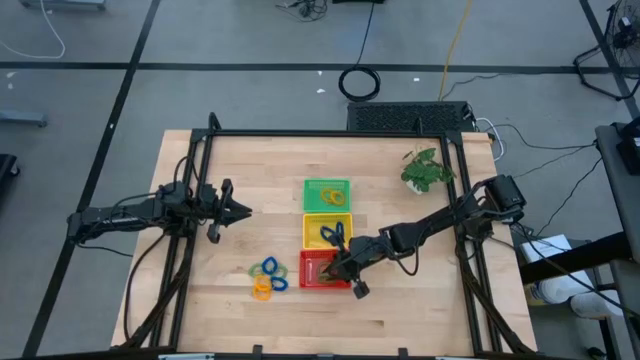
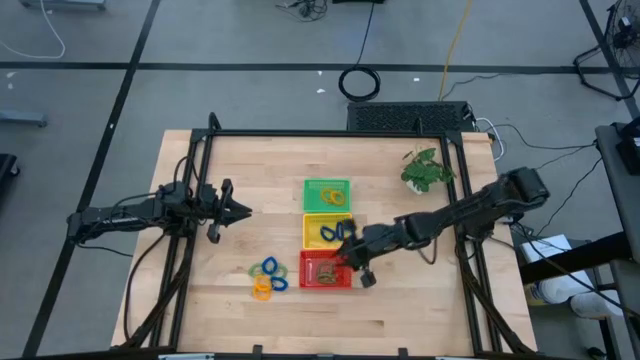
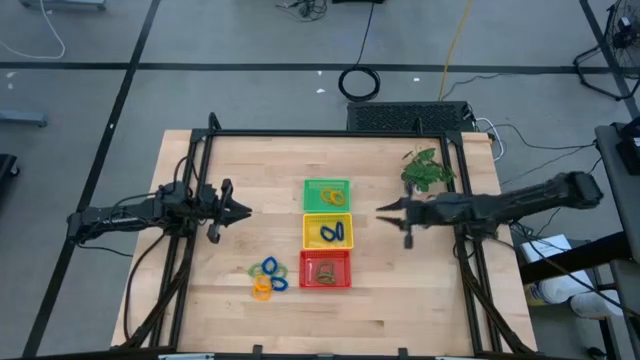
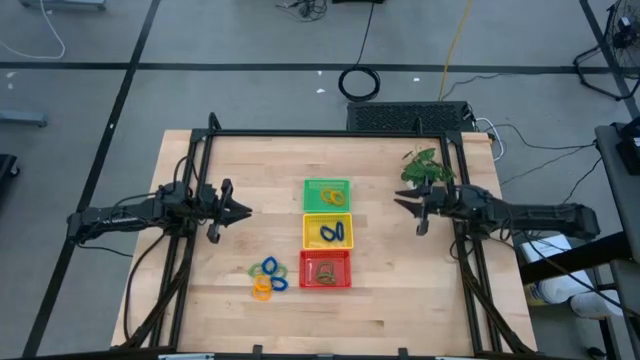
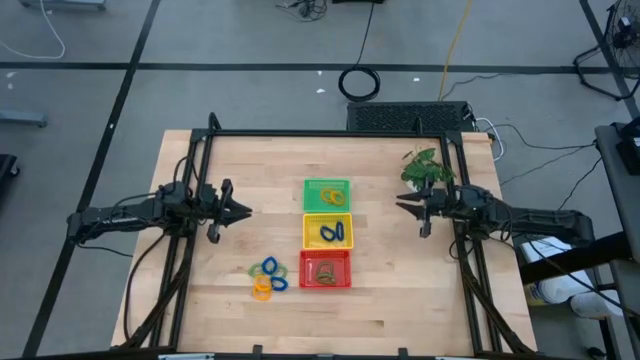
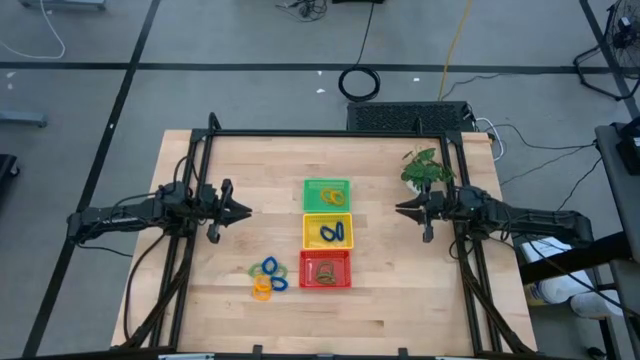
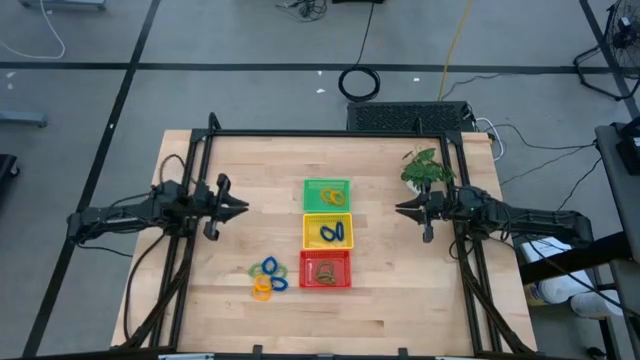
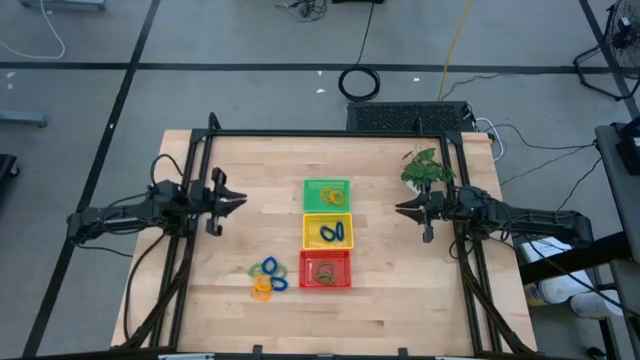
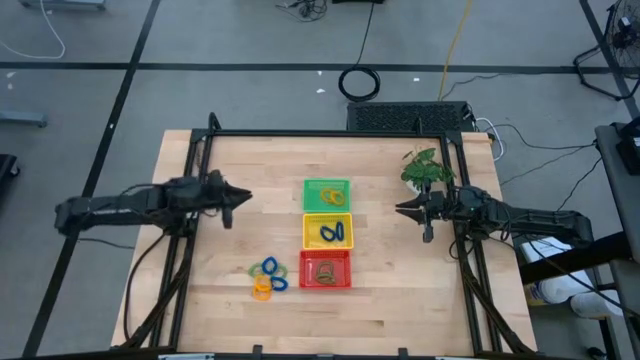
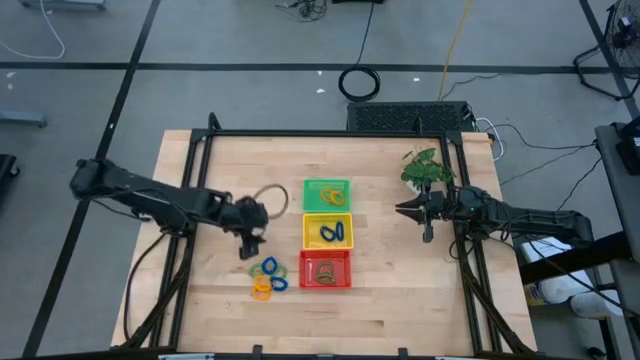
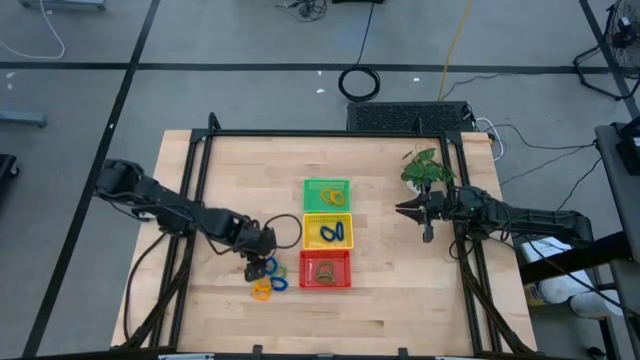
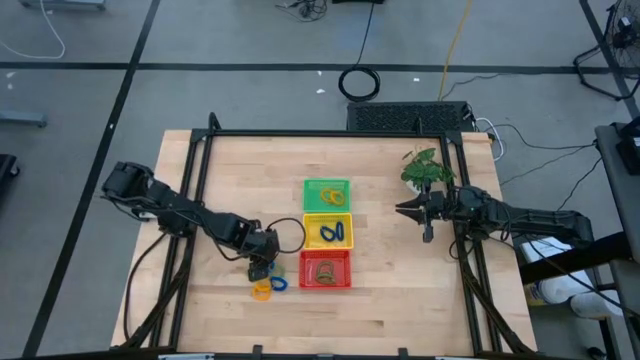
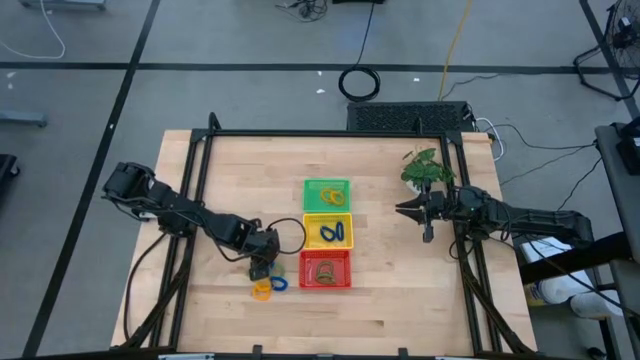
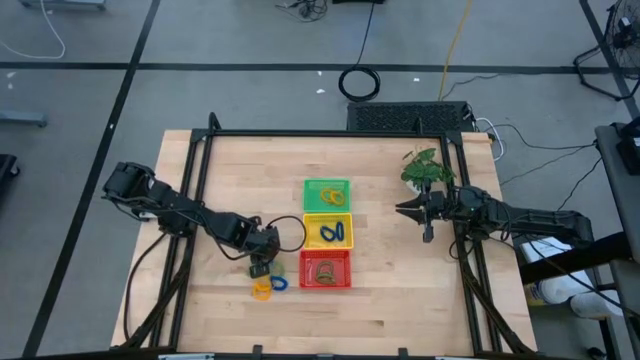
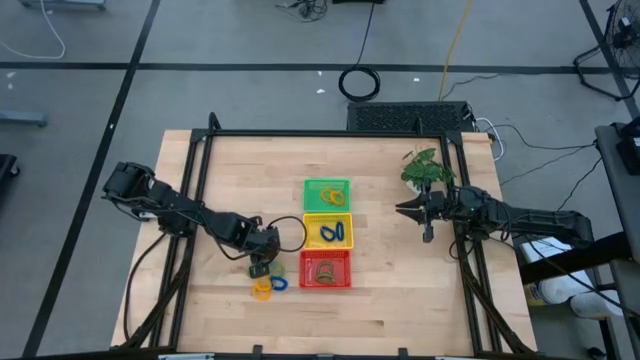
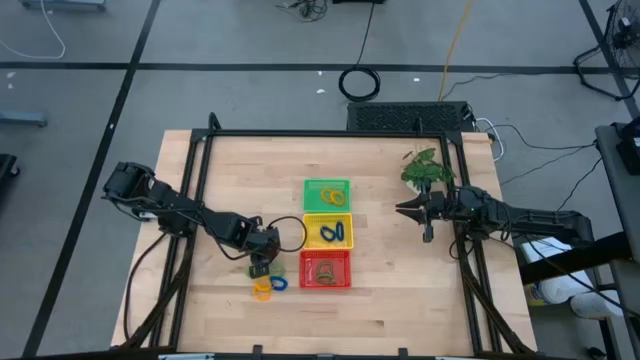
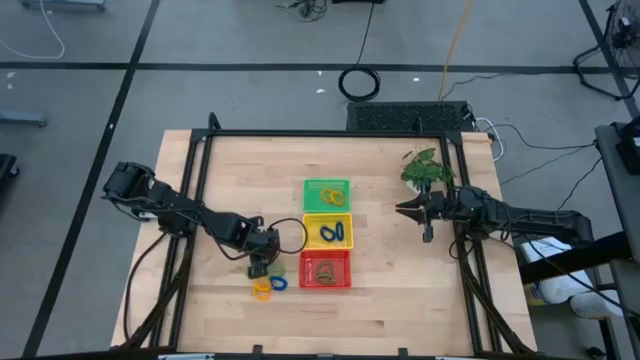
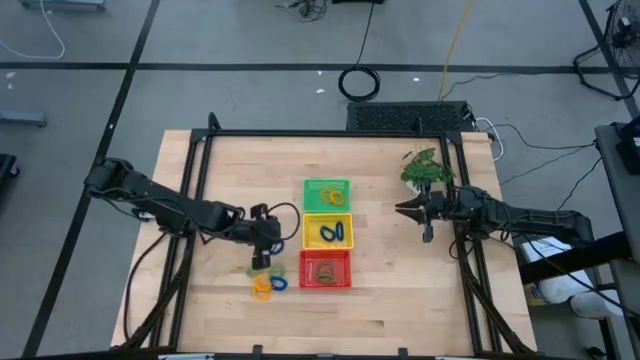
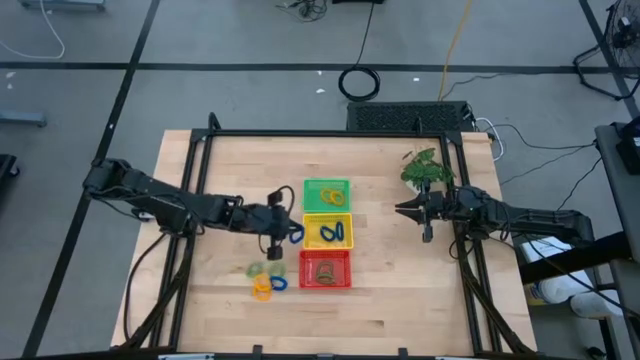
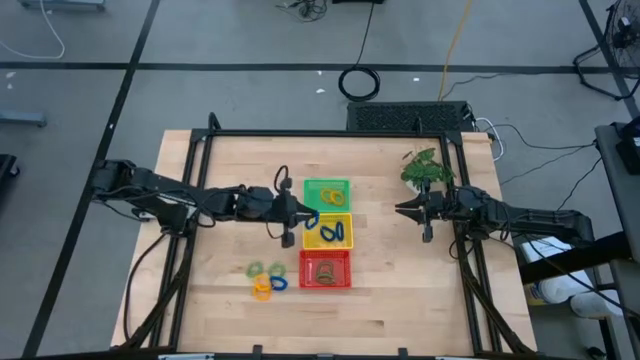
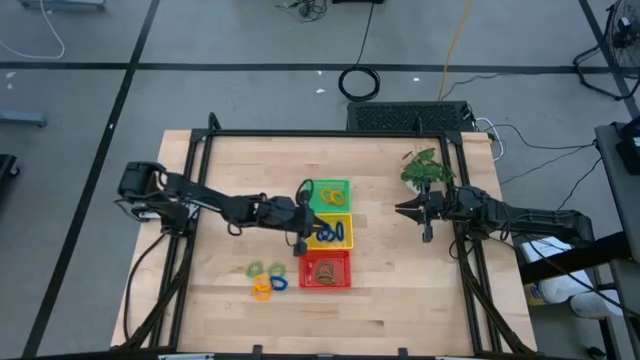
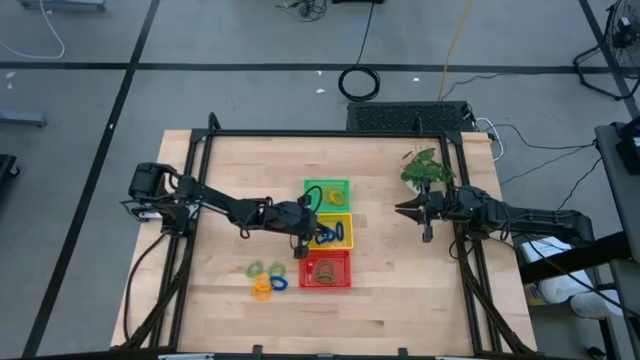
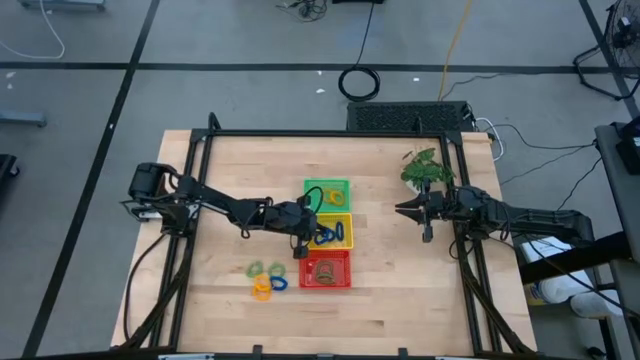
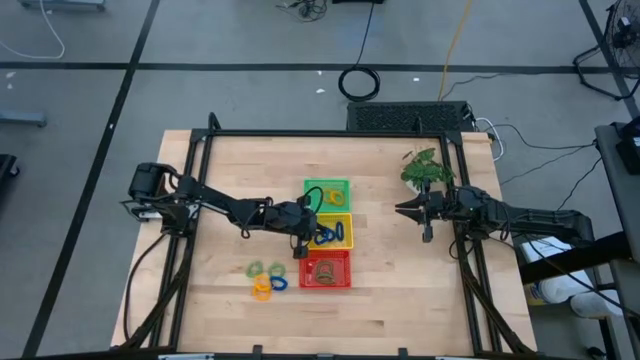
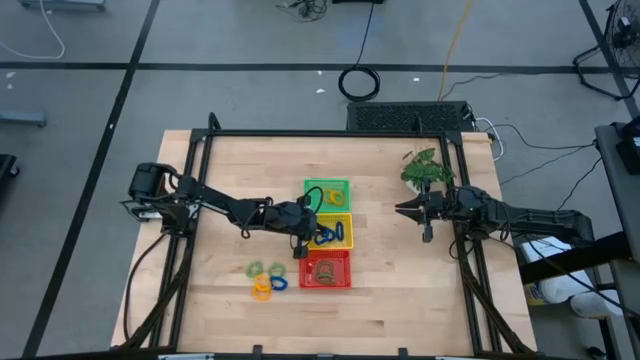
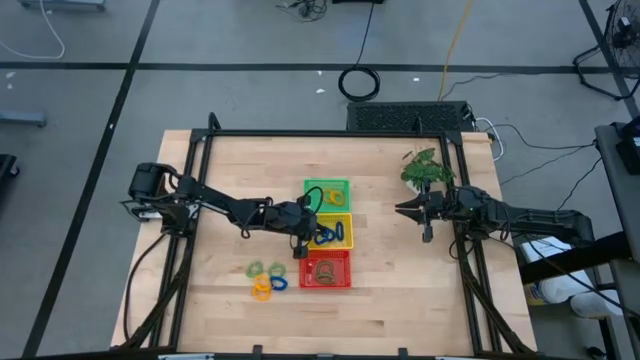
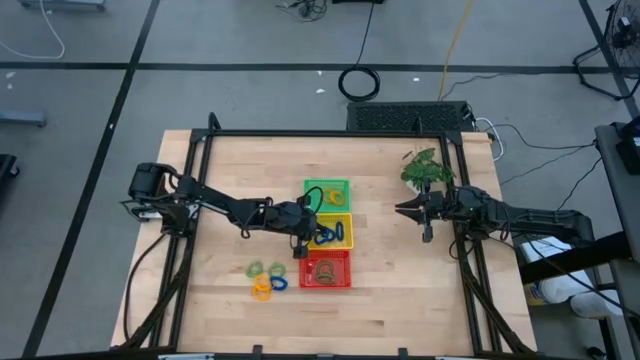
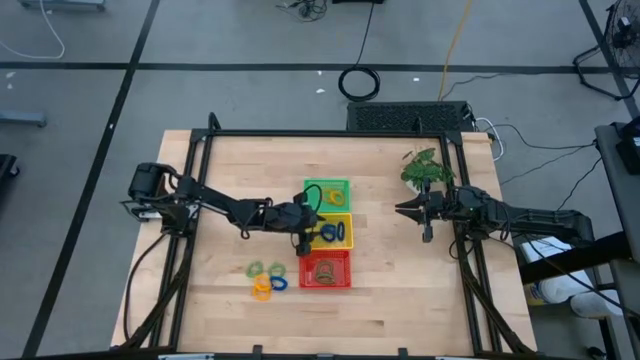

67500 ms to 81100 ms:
Task: Sort spring keychains into baskets
Put the blue spring keychain into the yellow basket

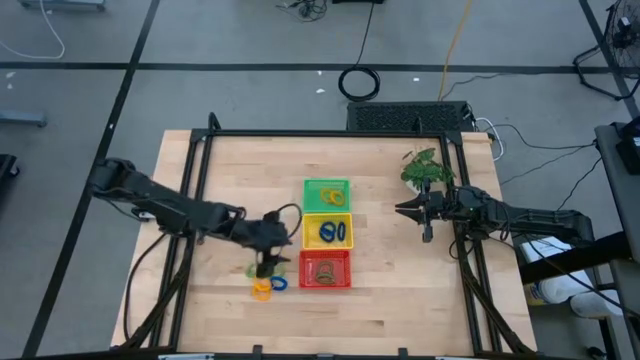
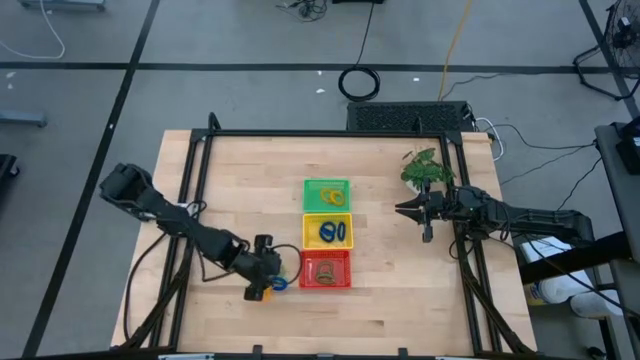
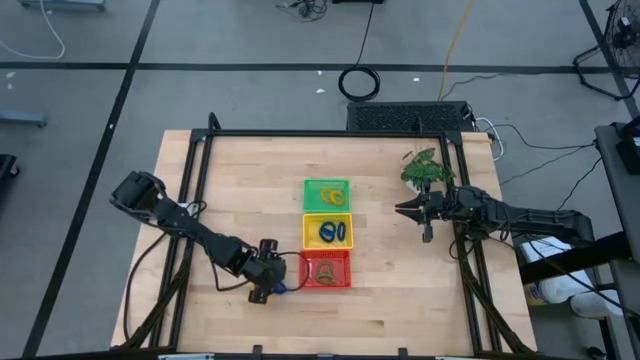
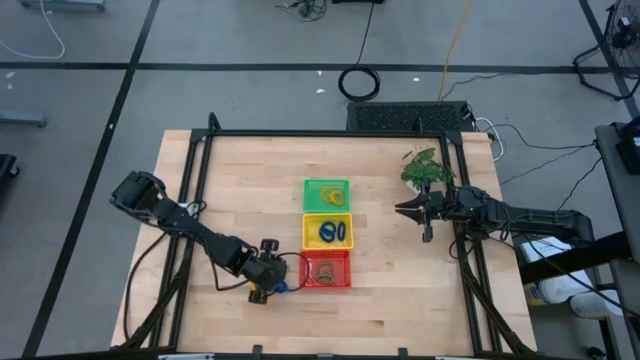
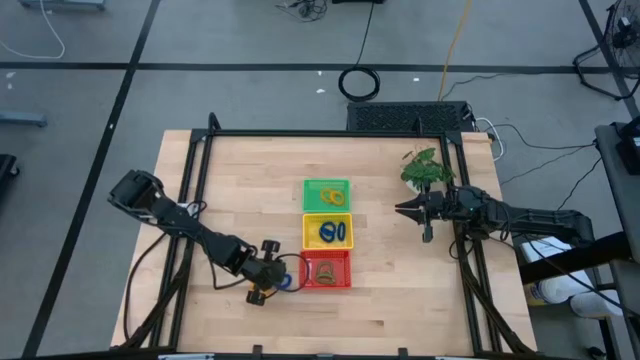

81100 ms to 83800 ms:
Put the blue spring keychain into the yellow basket

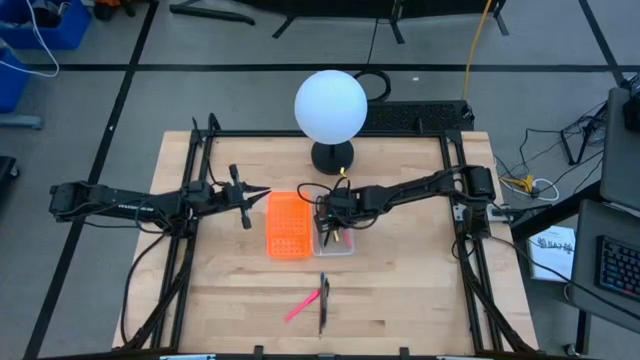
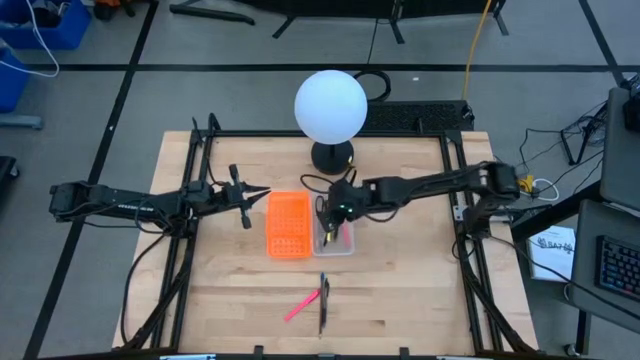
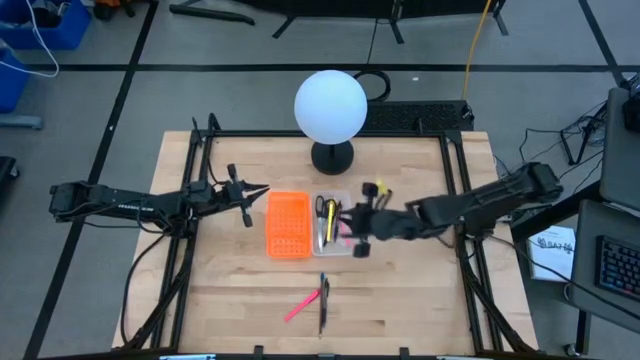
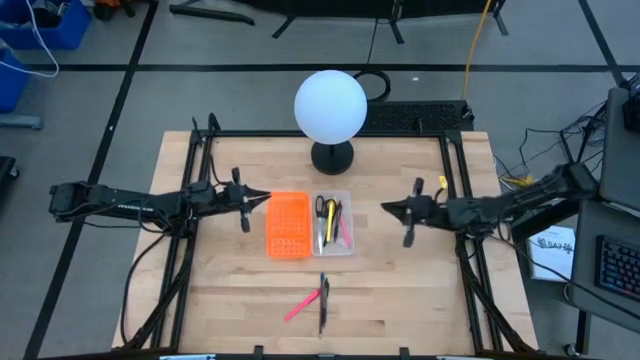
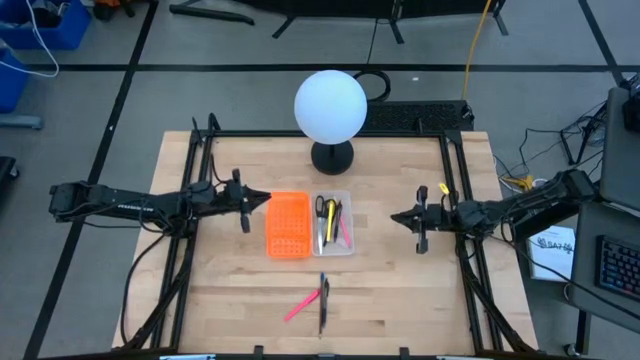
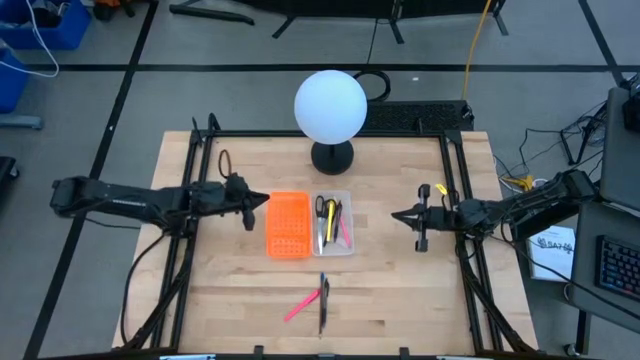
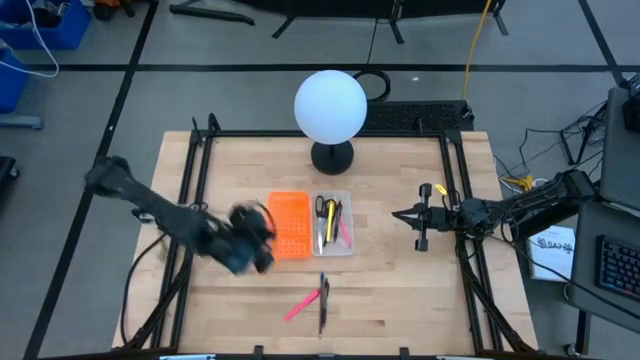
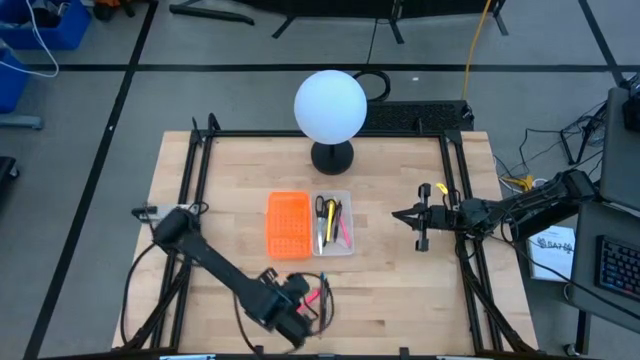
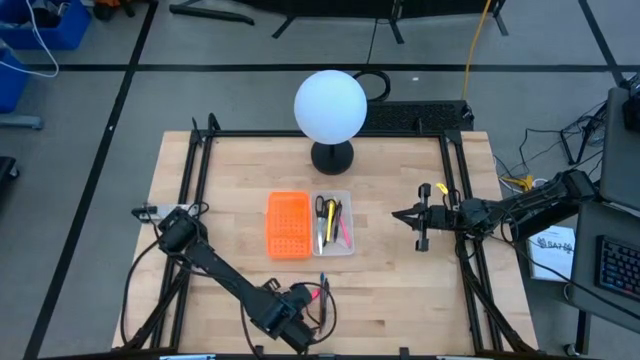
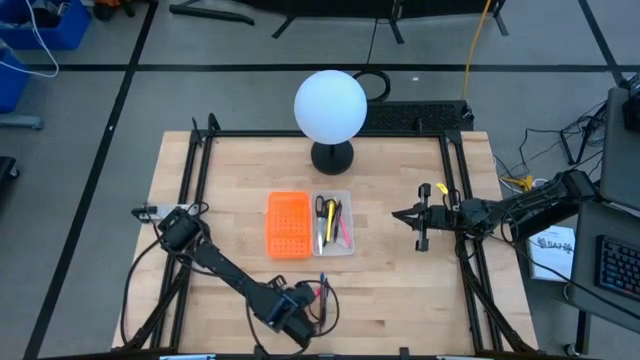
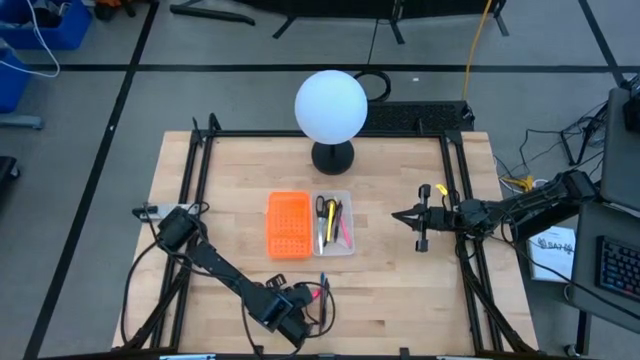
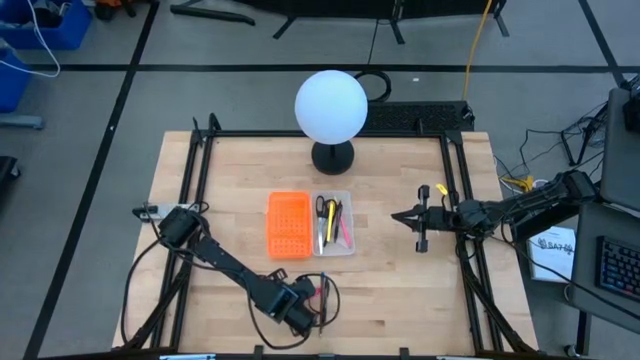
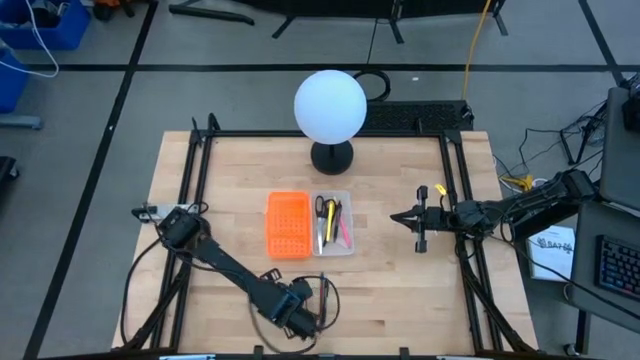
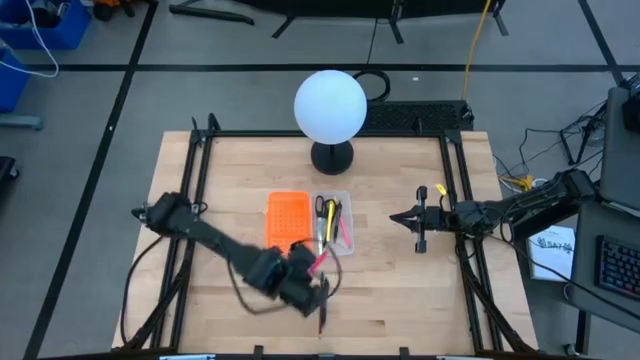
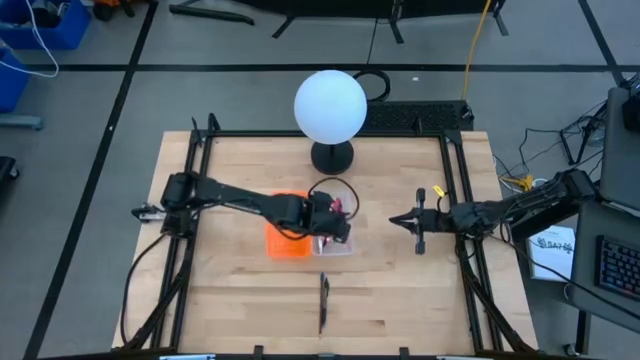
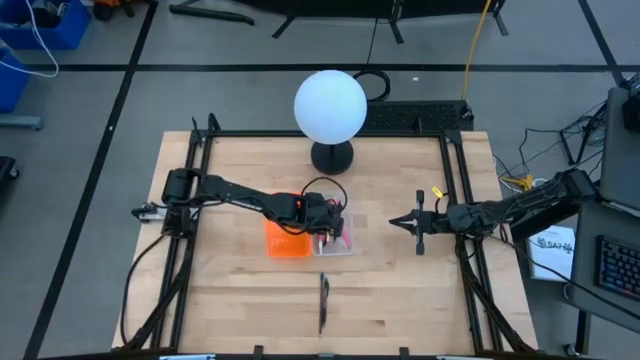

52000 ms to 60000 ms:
Task: Pick & place school supplies into a supply box
Put the pink highlighter into the supply box
